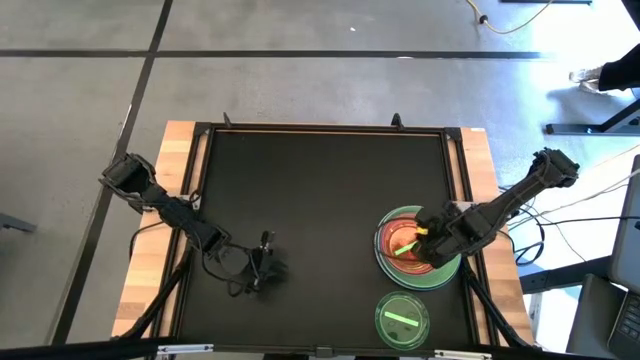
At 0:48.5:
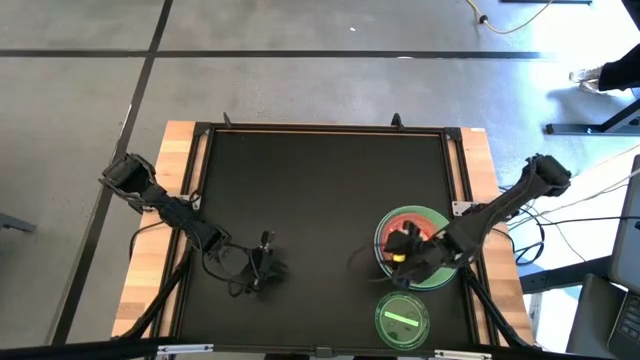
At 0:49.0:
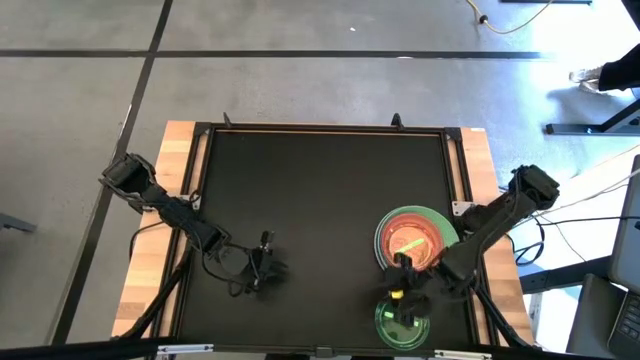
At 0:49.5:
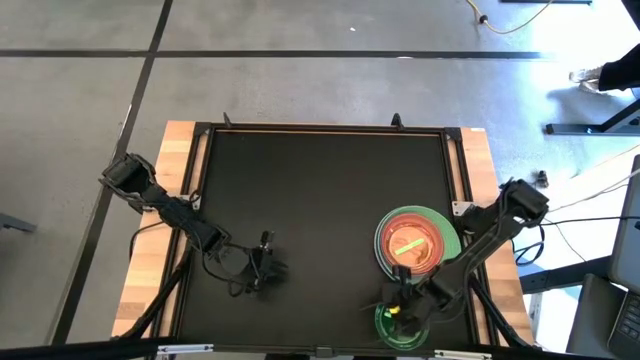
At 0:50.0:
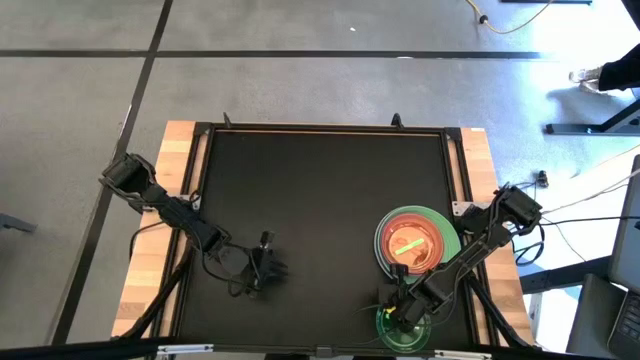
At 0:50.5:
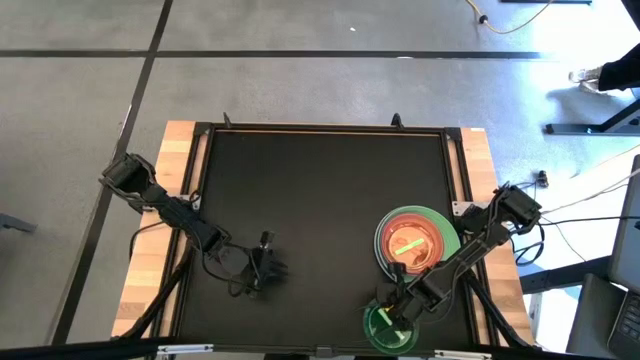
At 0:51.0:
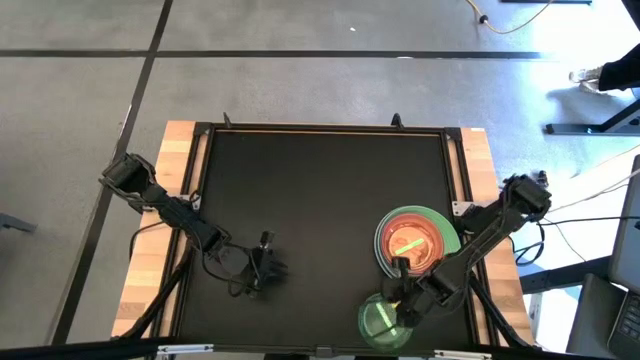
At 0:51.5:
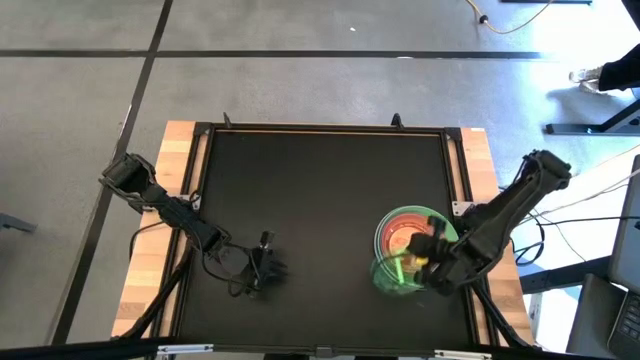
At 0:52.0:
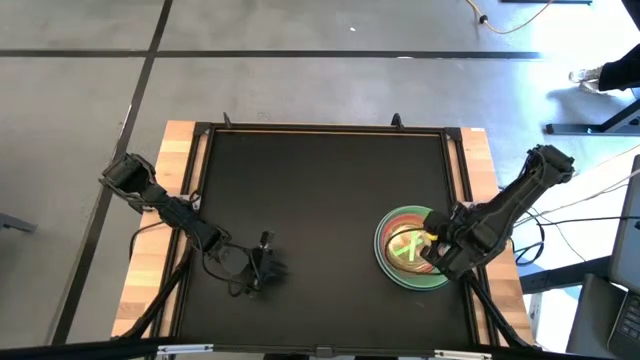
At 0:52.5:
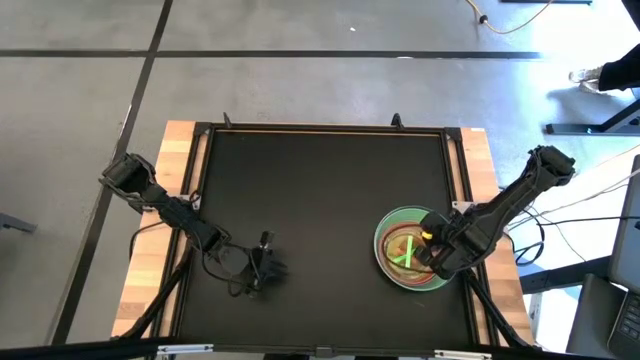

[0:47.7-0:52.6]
Task: Stack plastic plates
Stack the green plate on top of green plate

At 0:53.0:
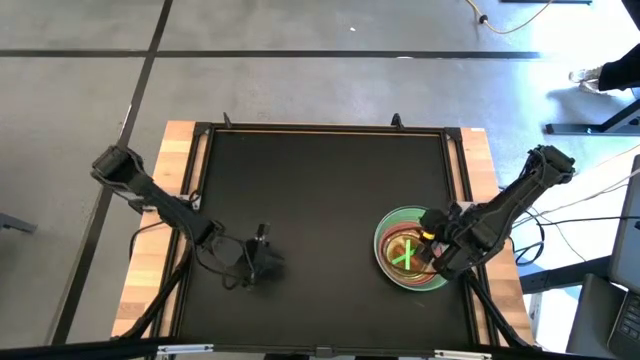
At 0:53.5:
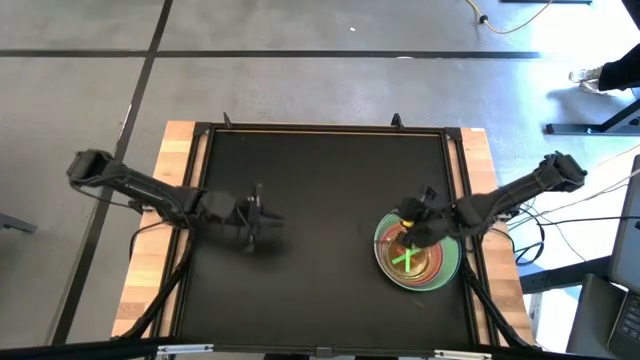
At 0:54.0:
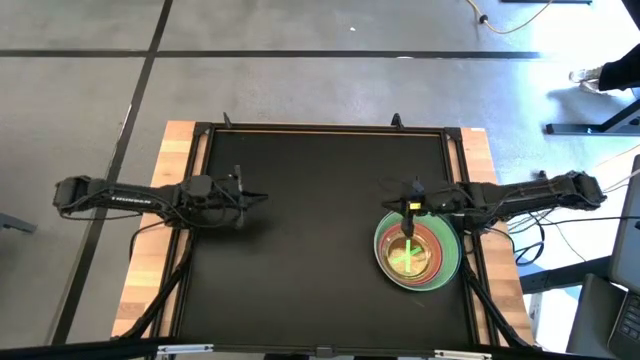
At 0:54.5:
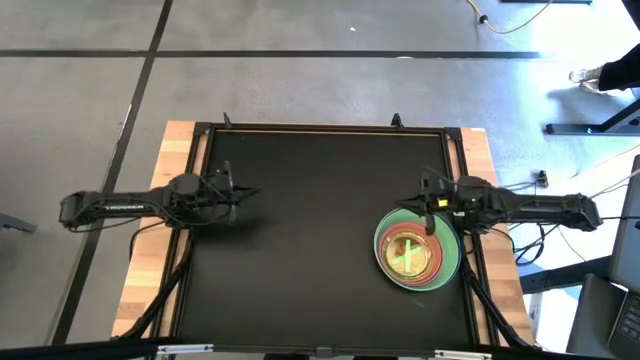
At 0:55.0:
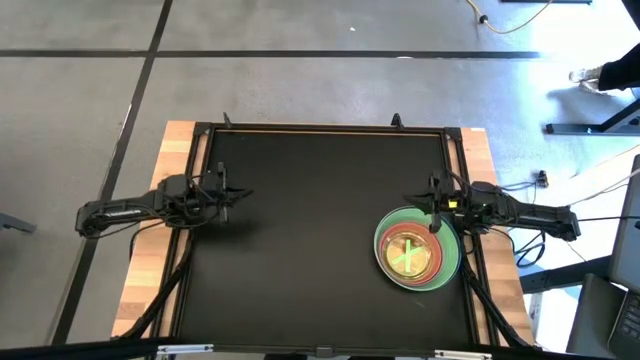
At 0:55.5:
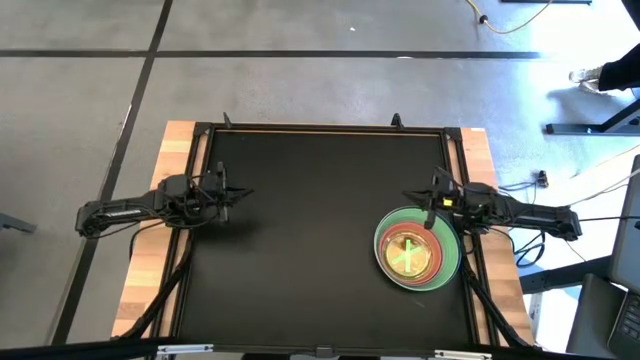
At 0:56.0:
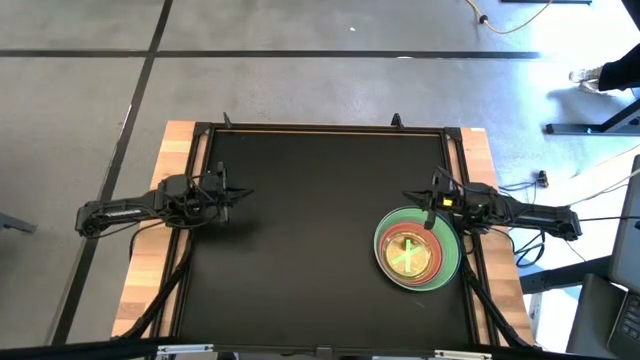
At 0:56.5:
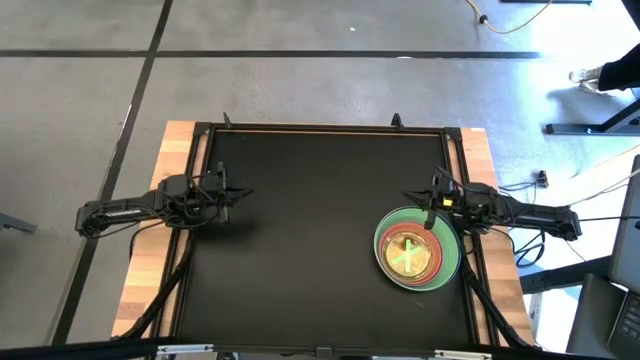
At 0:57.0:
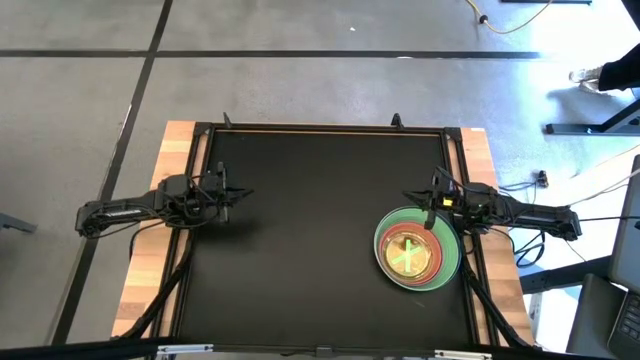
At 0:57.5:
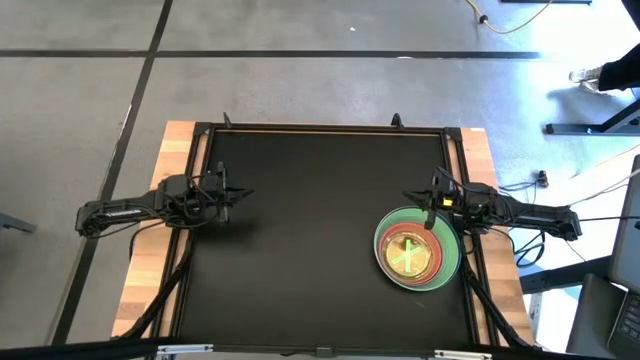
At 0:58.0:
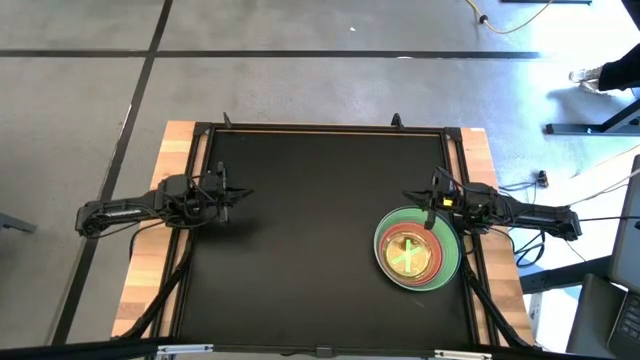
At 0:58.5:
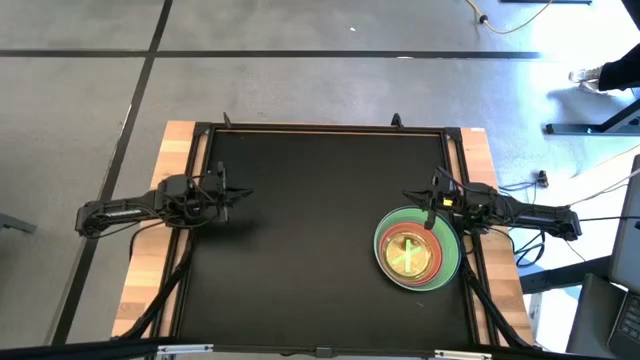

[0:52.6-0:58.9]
Return to Home Position

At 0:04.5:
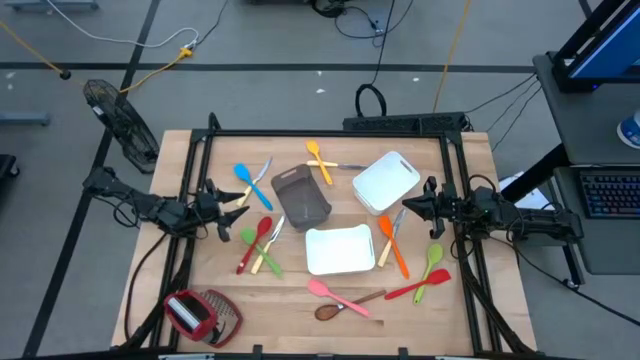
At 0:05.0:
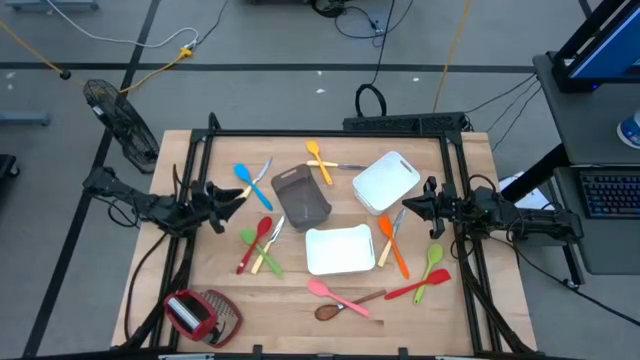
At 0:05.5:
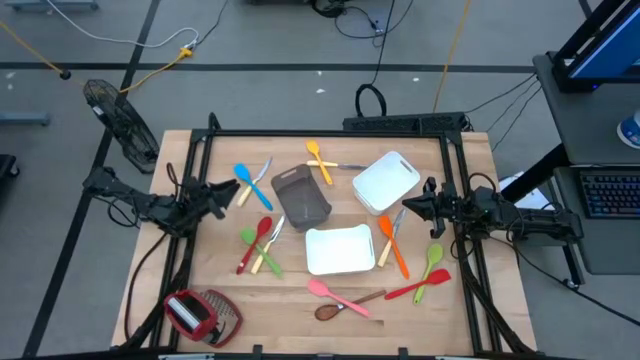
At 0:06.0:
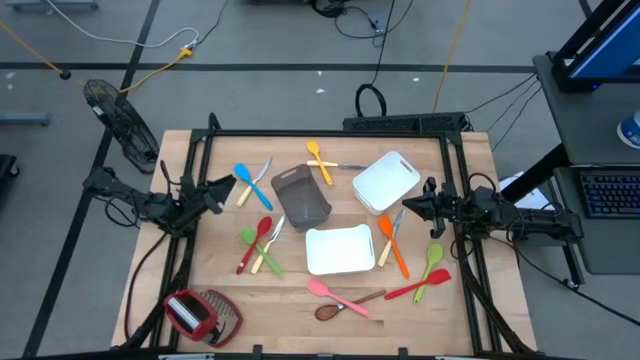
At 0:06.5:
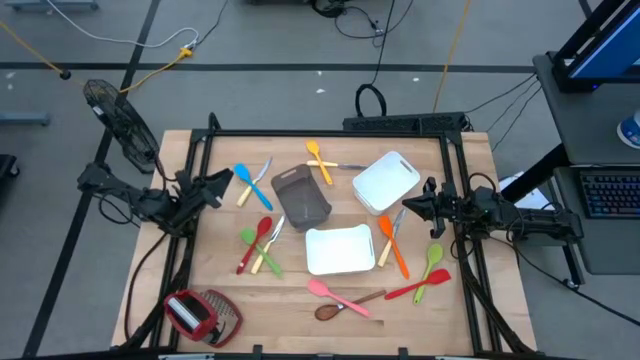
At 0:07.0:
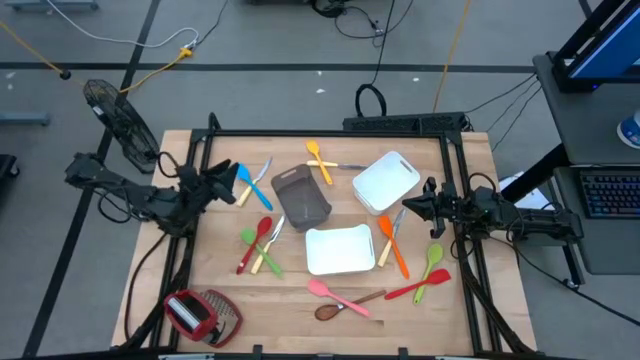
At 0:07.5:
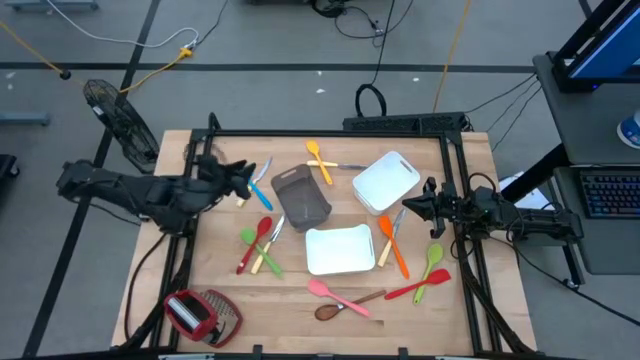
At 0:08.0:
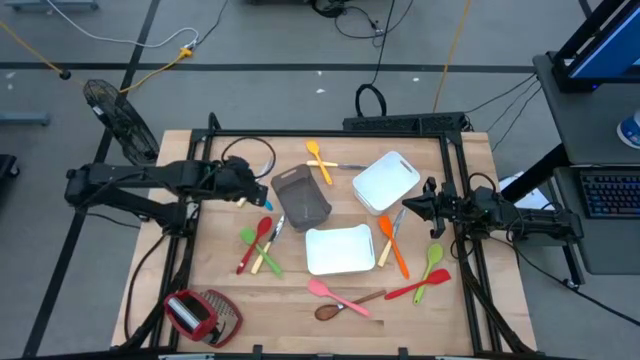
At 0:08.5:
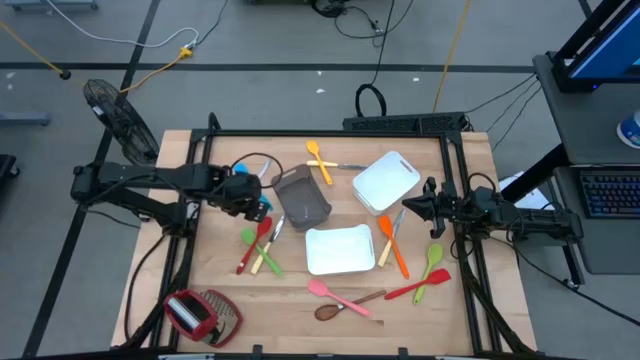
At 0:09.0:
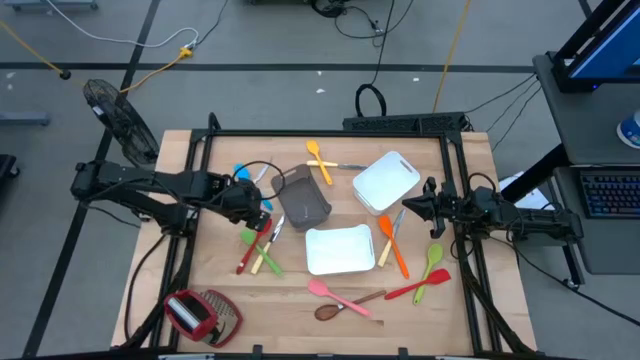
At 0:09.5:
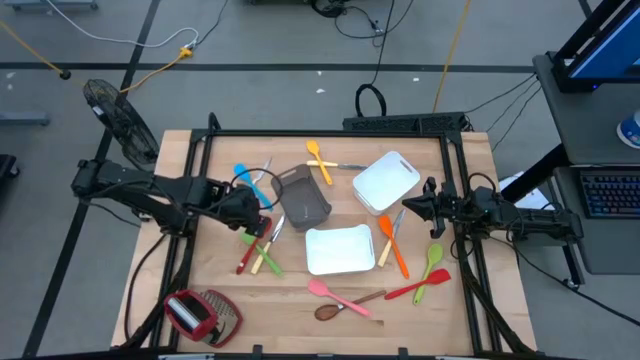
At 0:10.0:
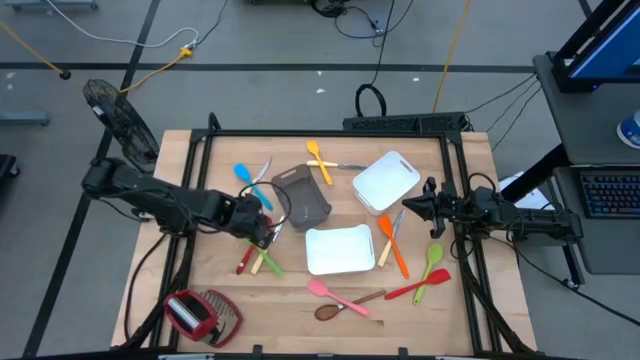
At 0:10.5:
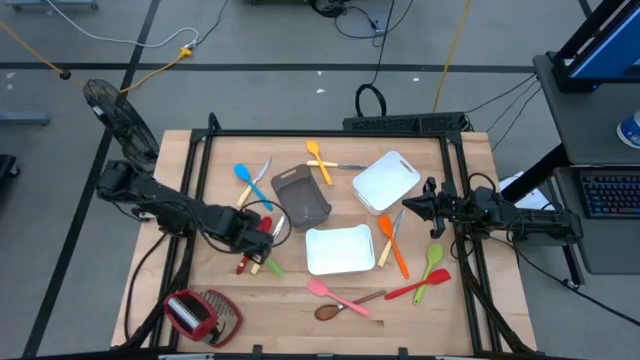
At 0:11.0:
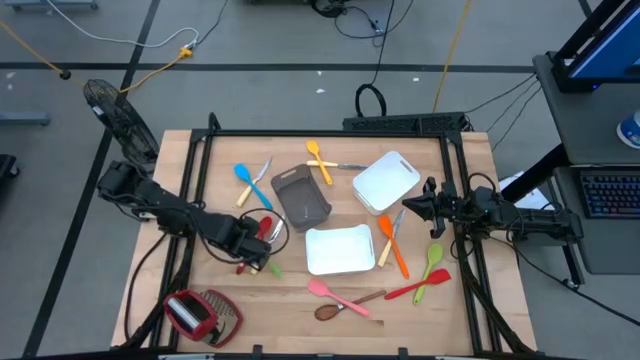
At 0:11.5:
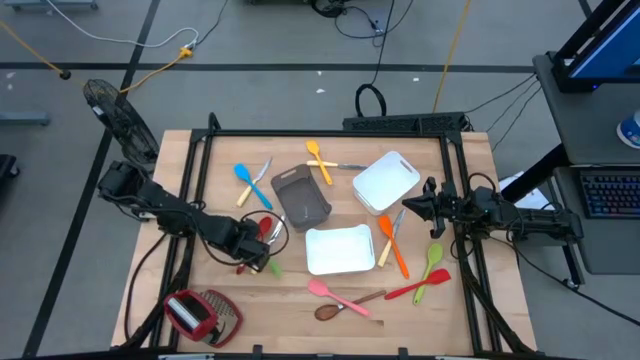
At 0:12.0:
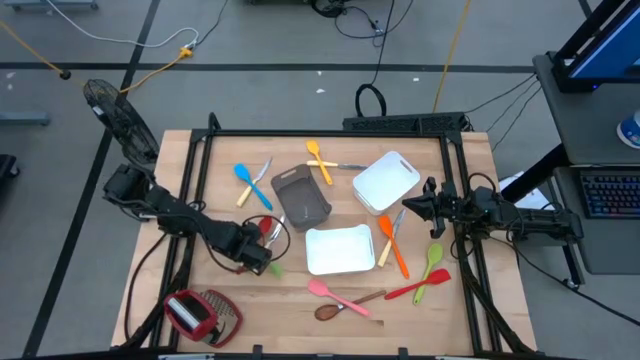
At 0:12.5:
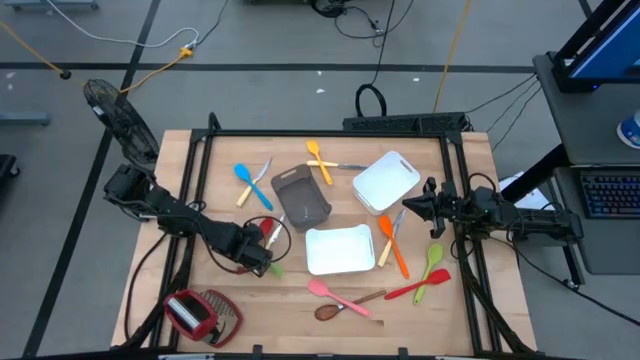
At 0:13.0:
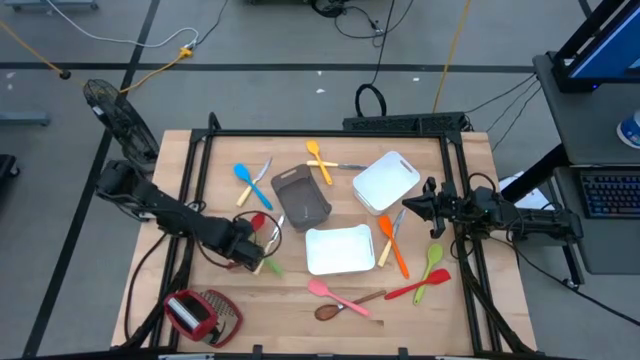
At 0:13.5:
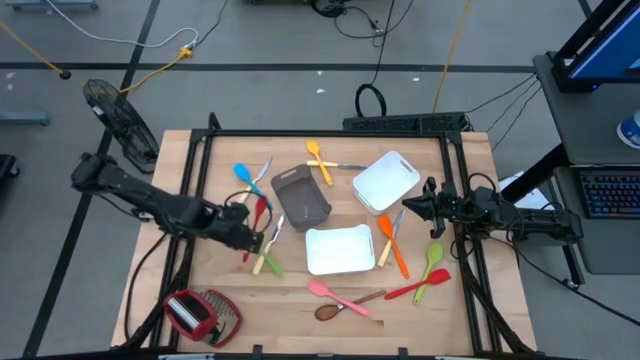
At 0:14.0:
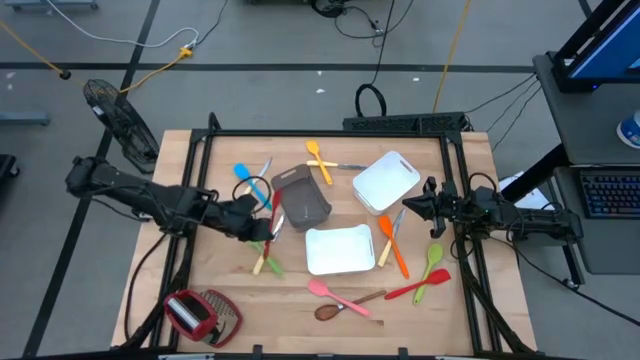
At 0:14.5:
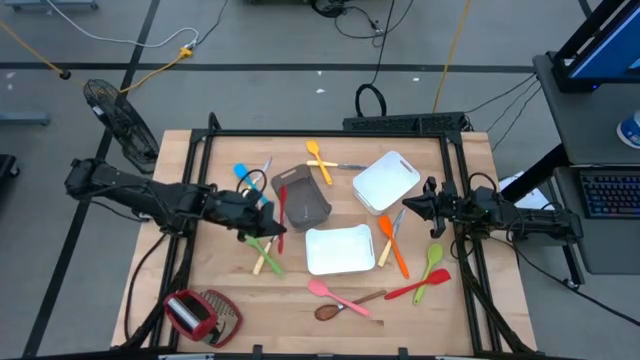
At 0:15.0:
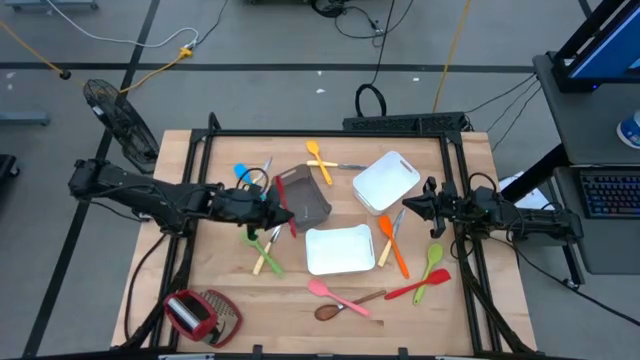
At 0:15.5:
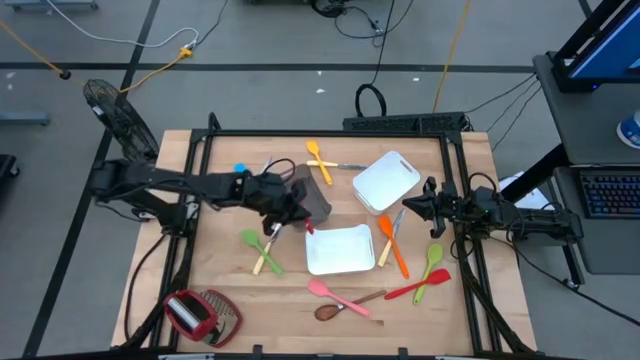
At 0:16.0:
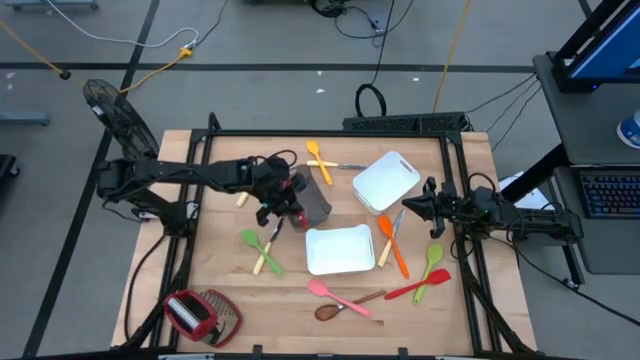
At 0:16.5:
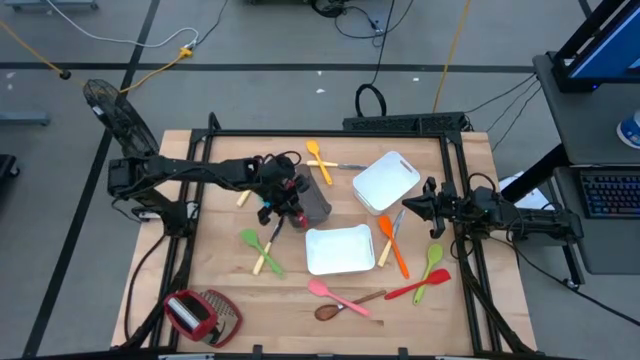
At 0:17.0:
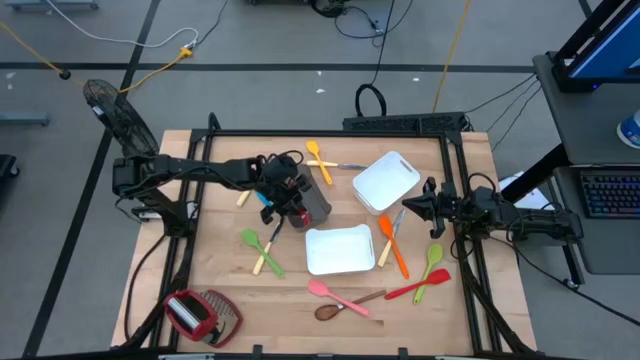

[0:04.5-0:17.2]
Task: Pick & Place Kitchen Items
Put the red serving spoon into the black bin
